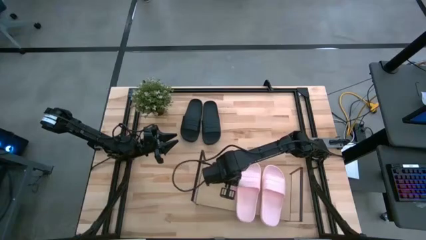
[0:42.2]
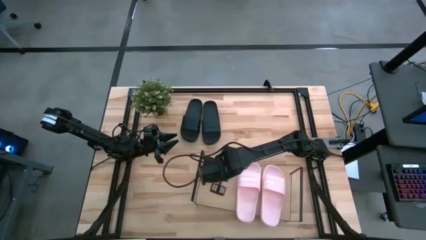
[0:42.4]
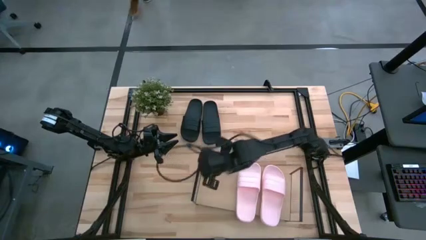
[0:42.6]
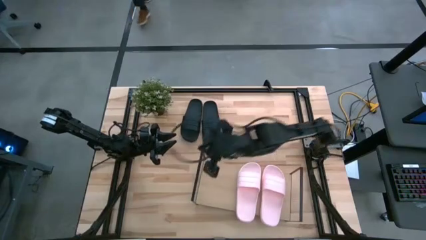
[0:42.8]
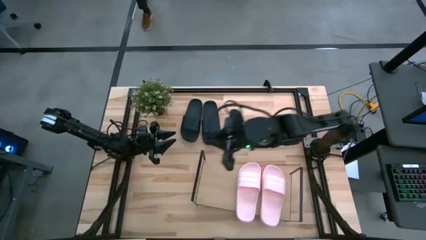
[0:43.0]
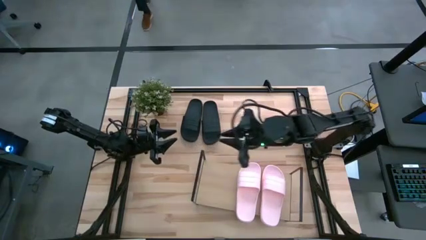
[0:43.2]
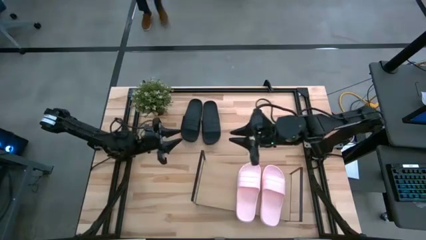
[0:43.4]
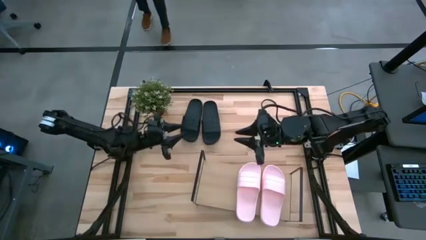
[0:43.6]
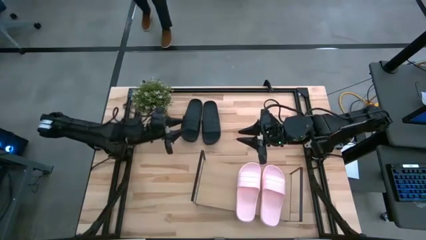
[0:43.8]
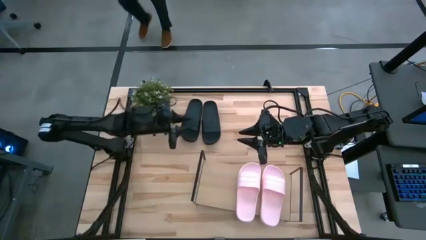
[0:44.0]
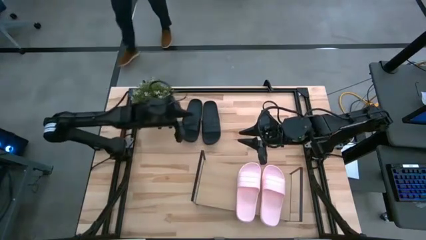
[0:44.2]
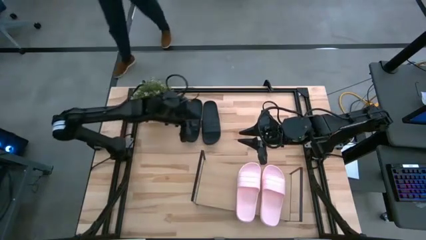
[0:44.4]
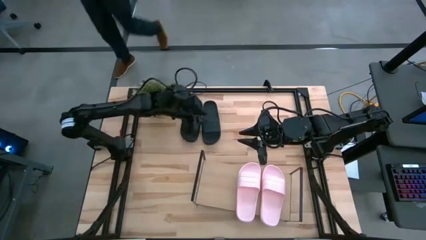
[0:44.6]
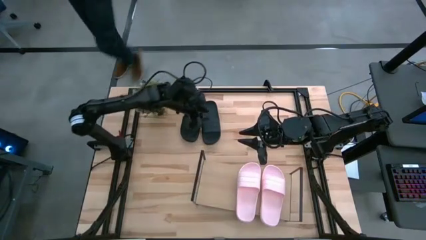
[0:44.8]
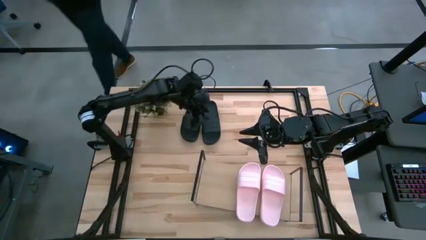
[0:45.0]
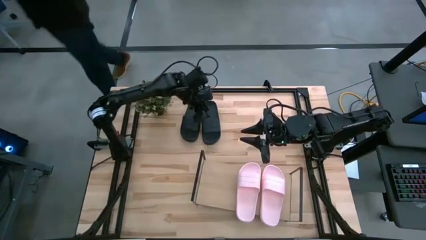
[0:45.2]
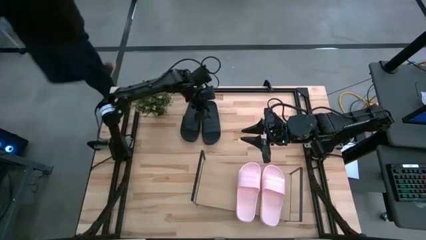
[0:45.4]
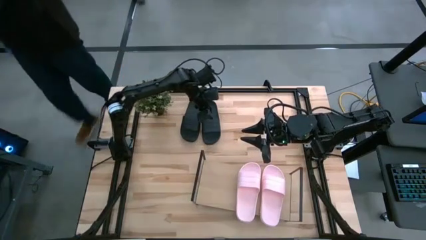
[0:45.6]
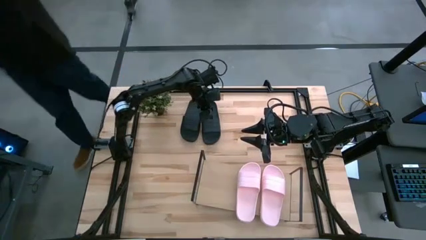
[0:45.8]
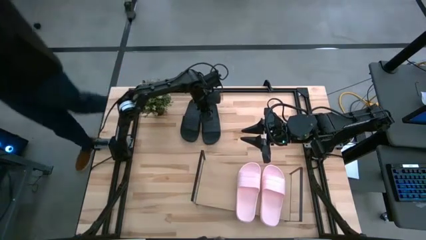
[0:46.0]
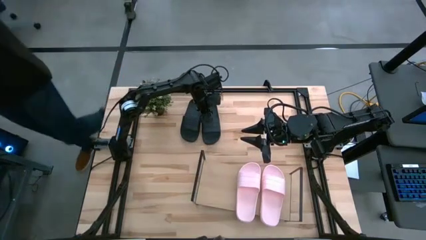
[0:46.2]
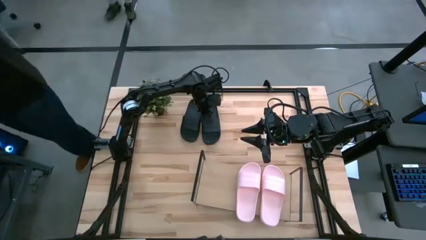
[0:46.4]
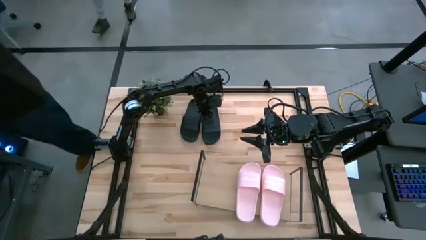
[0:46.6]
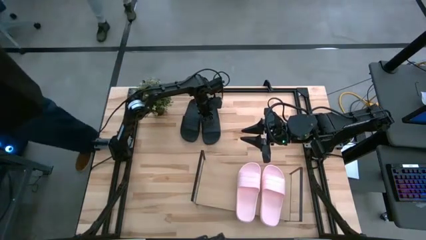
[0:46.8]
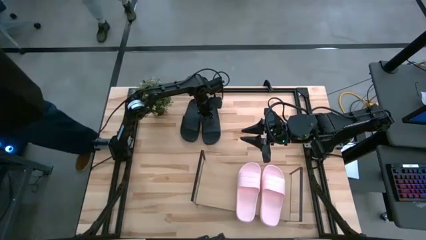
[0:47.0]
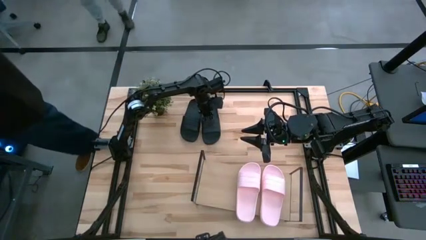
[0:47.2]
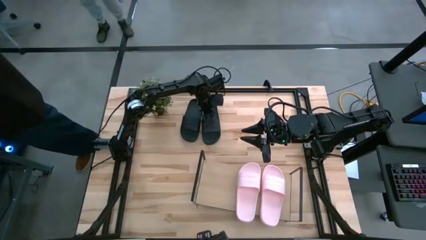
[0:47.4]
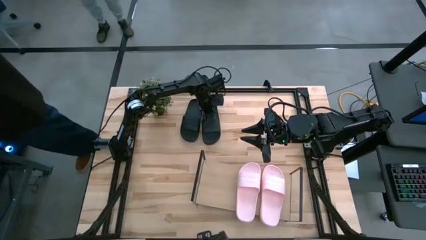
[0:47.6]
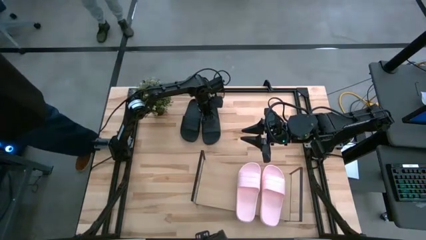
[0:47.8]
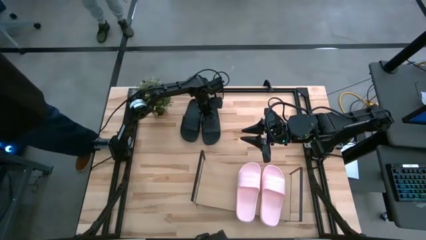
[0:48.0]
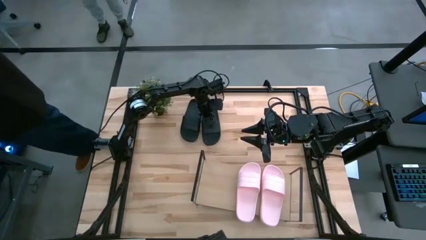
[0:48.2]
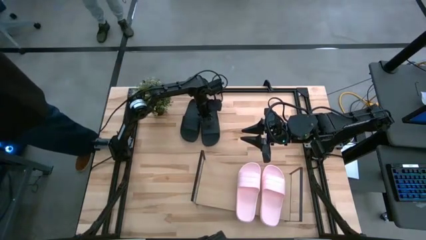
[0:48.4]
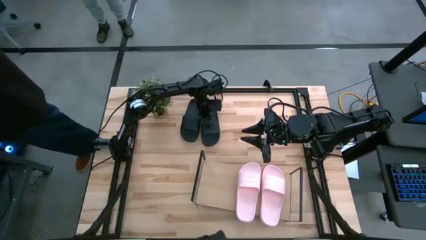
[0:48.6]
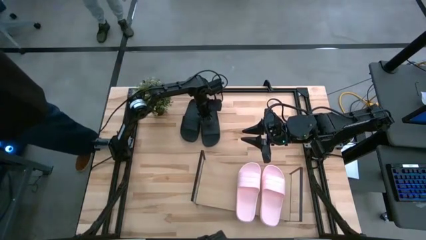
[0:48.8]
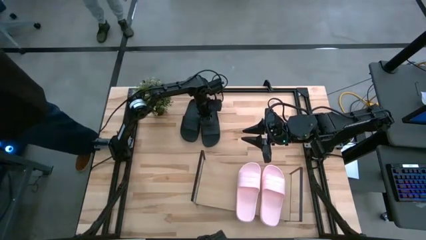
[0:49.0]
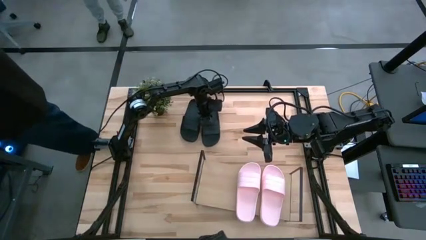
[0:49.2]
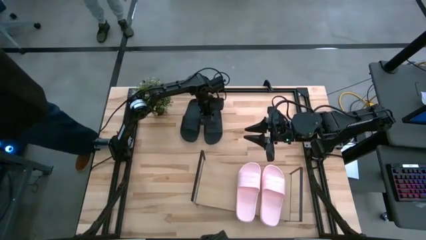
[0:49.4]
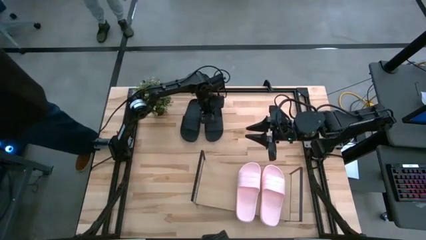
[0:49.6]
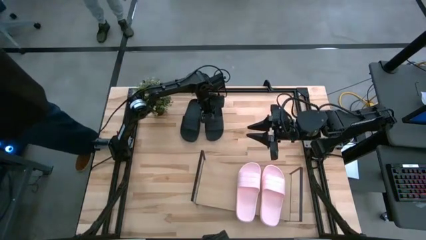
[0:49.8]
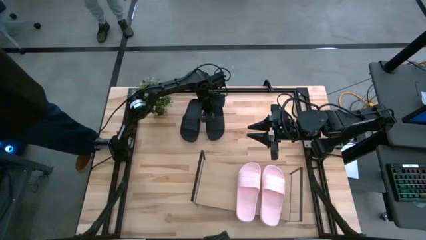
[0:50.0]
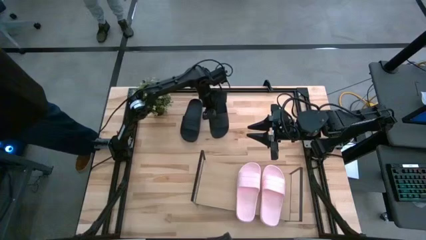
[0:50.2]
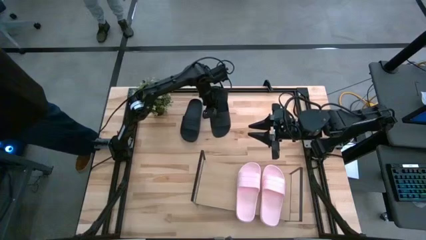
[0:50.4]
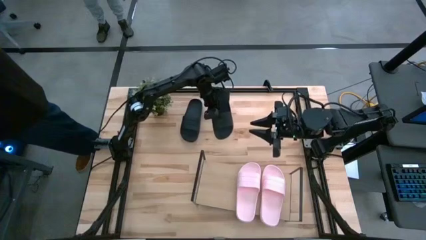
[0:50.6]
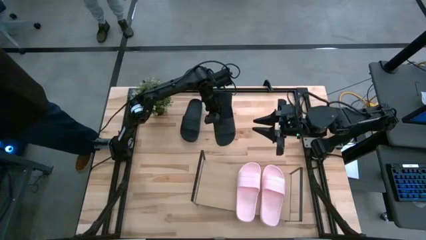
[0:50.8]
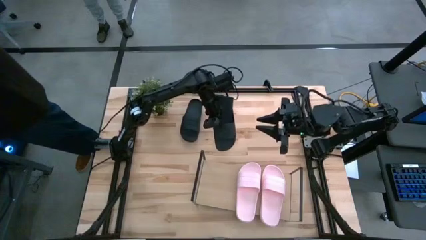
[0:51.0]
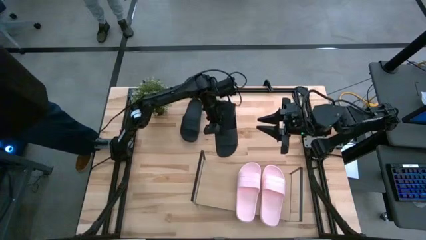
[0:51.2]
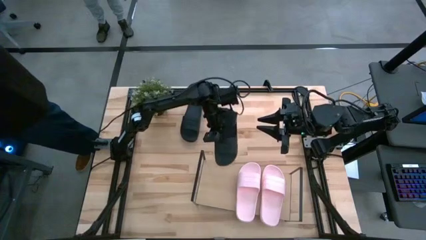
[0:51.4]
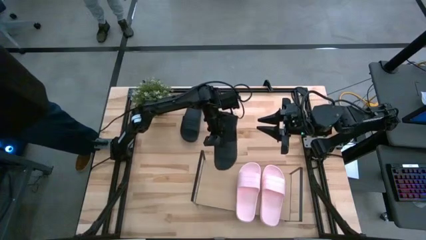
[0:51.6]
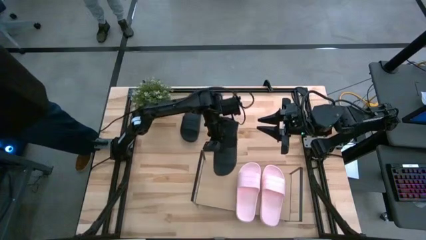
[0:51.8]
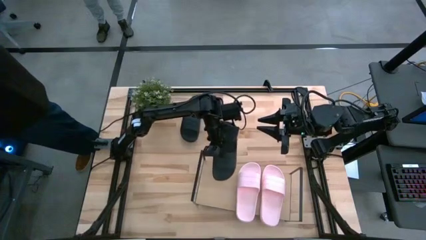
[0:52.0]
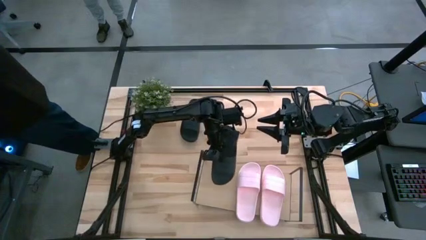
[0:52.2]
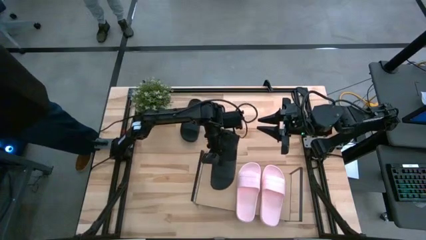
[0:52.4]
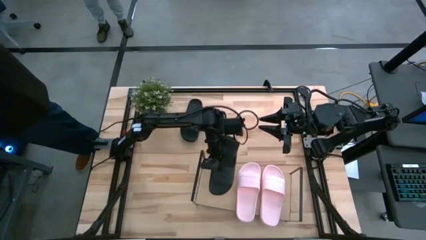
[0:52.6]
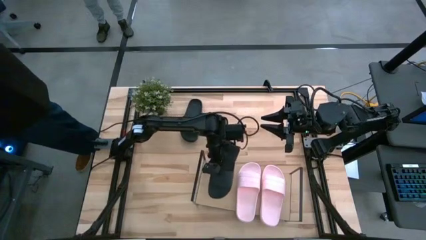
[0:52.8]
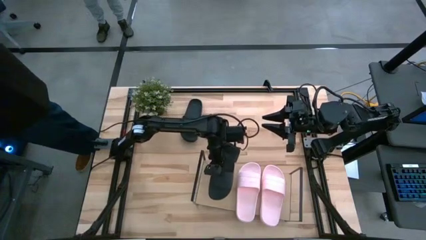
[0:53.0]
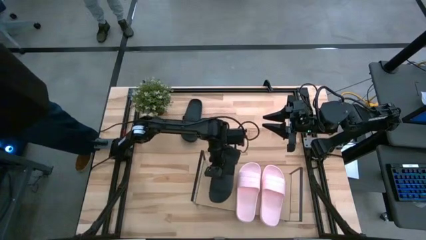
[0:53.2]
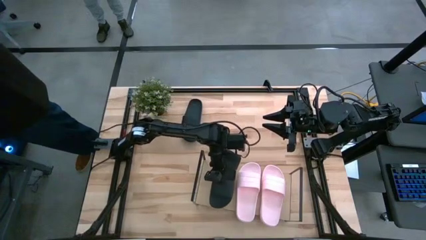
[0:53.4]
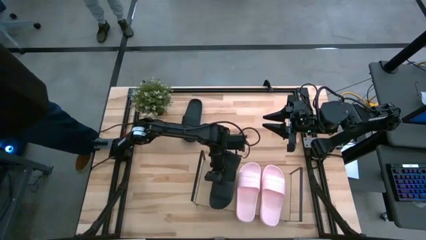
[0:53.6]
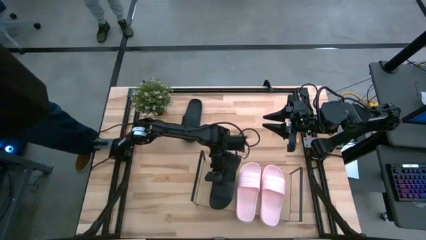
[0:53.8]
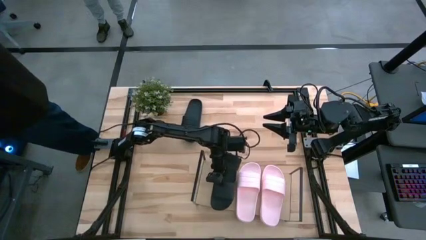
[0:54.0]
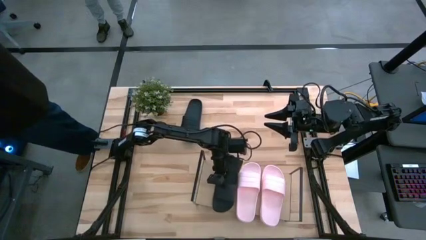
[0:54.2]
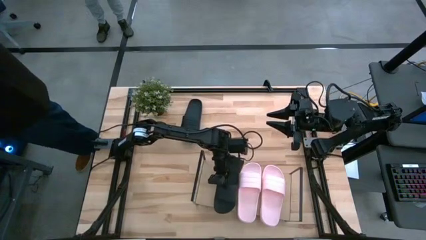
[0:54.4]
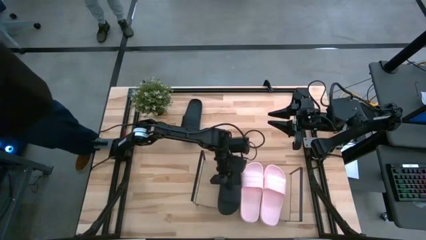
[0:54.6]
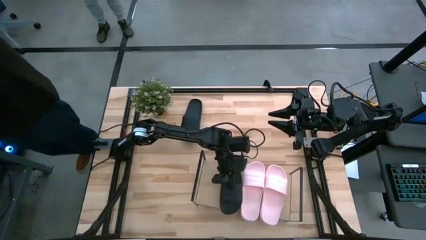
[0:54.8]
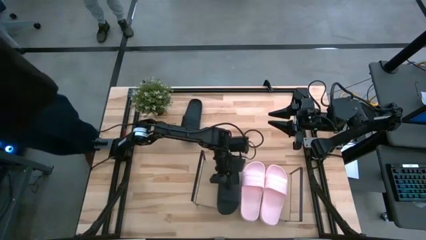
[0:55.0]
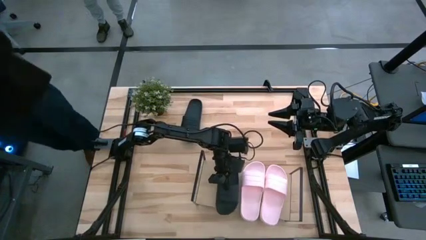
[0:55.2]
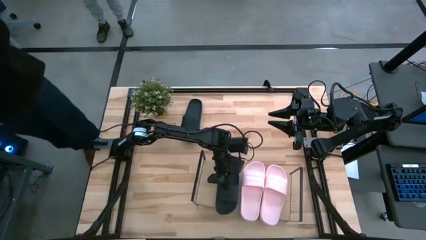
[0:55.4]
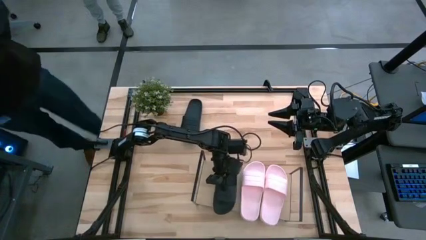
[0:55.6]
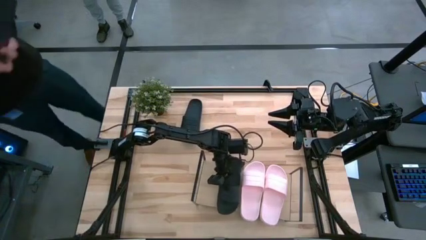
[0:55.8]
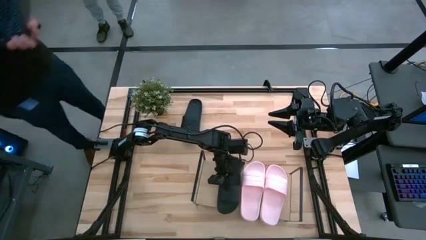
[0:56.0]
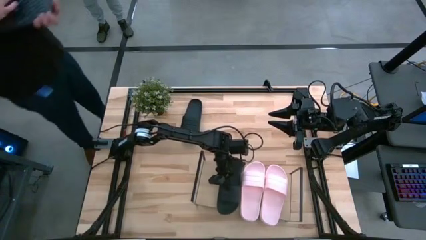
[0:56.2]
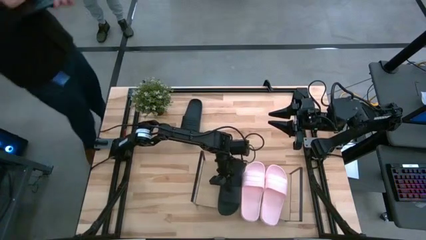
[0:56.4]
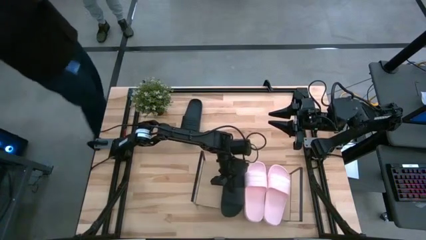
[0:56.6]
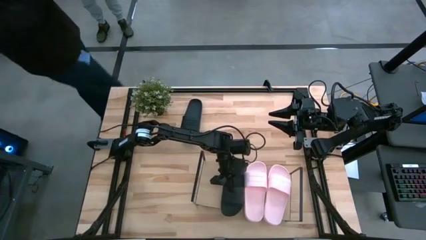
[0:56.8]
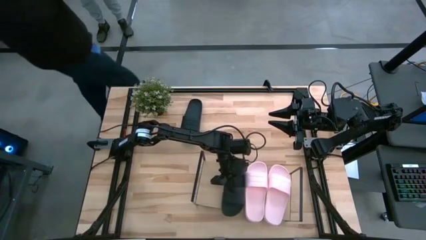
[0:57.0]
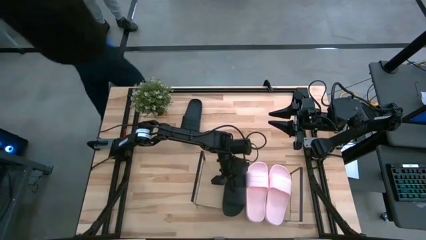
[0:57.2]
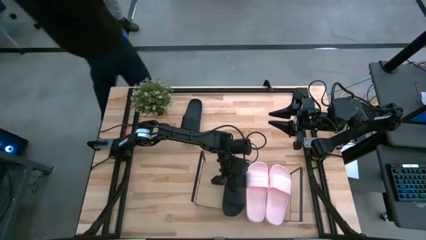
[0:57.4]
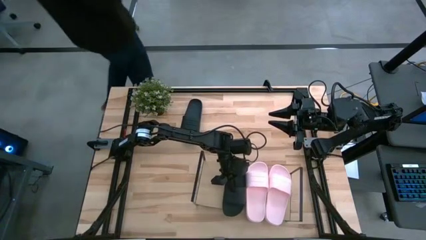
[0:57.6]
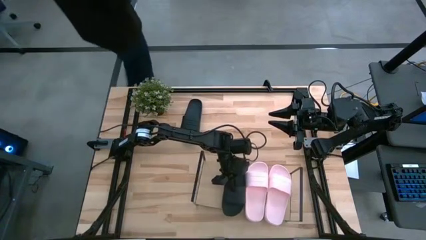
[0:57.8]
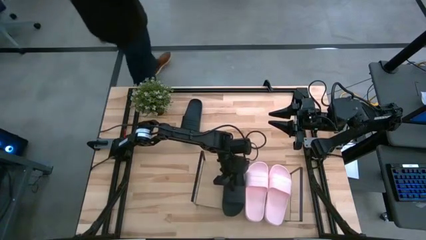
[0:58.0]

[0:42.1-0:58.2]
Task: Pick and place slides into the shelf
Put the right black slide on the shelf beside the pink slide
